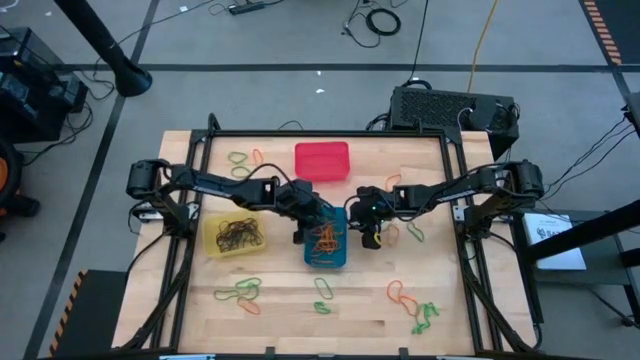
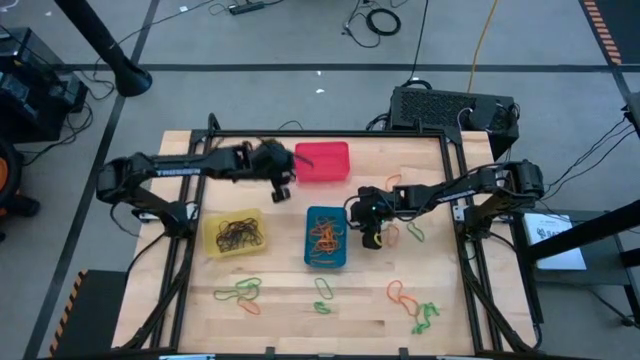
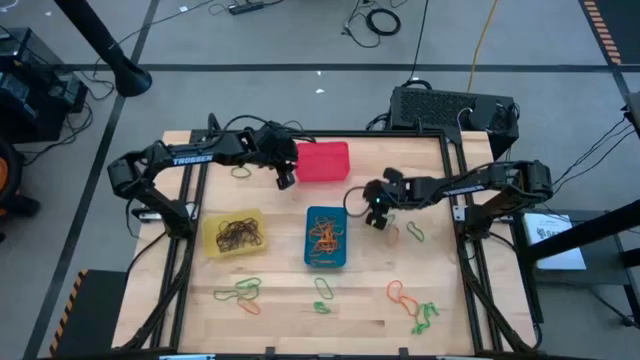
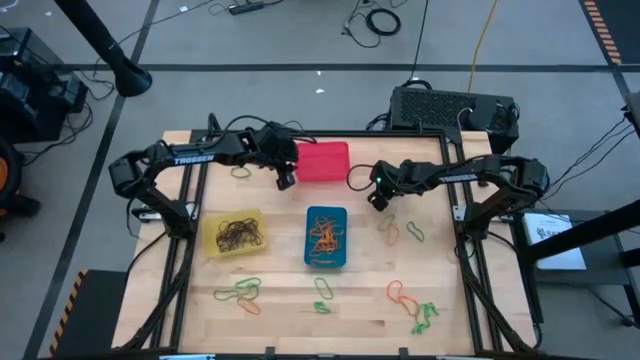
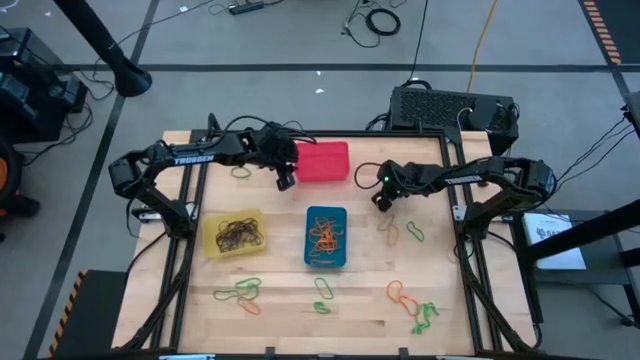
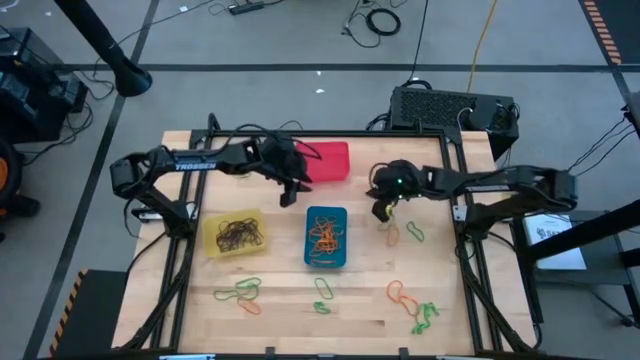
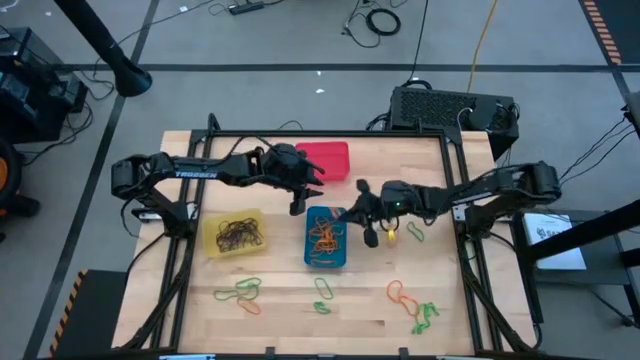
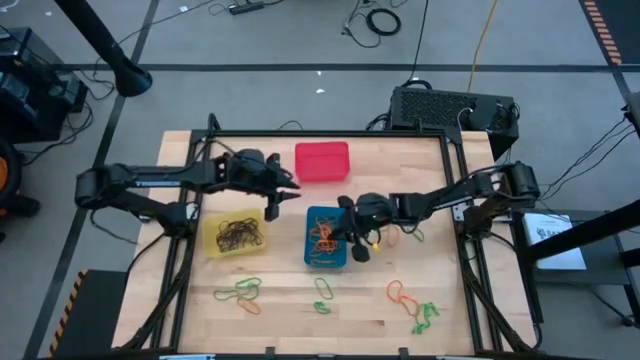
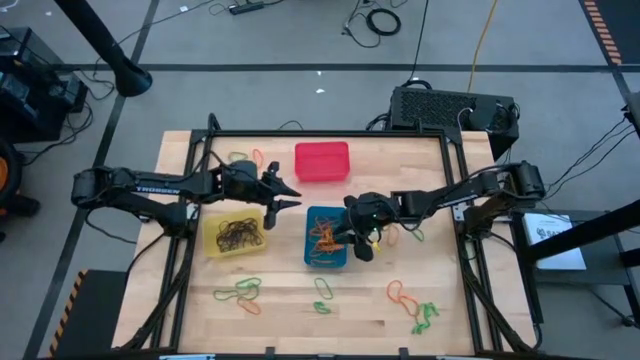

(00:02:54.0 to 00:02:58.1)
Task: Sort rubber bands into baskets
Put the orange rubber band into the blue bin

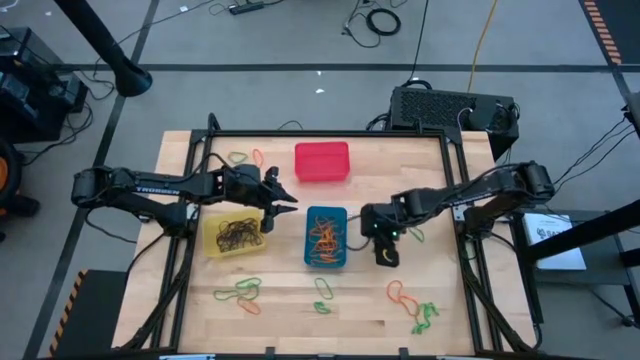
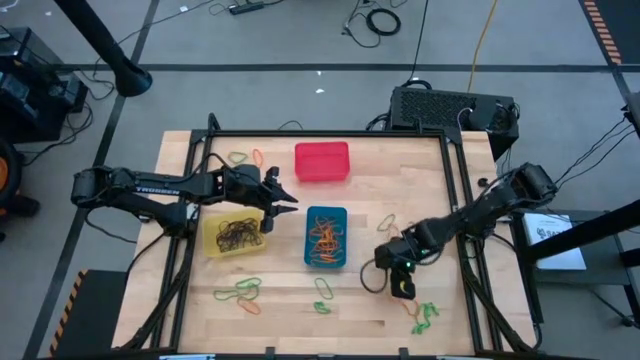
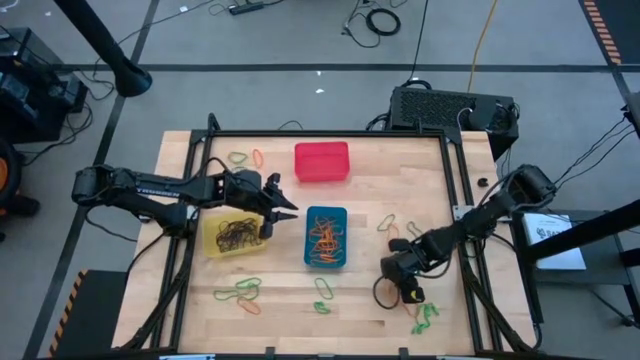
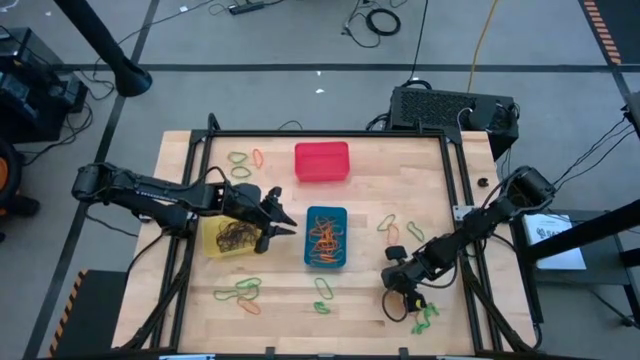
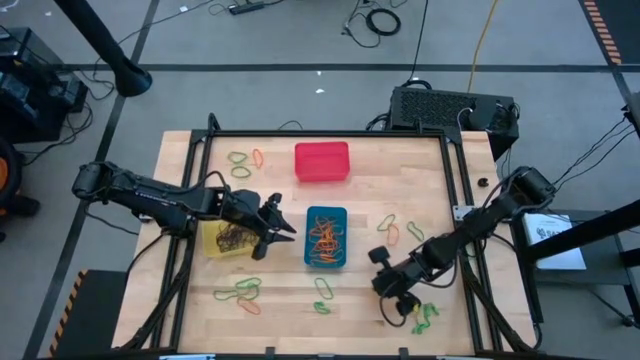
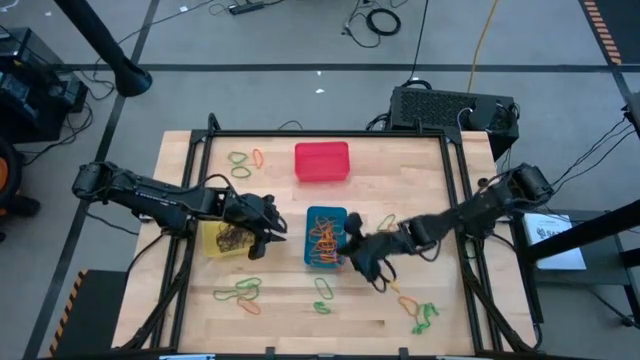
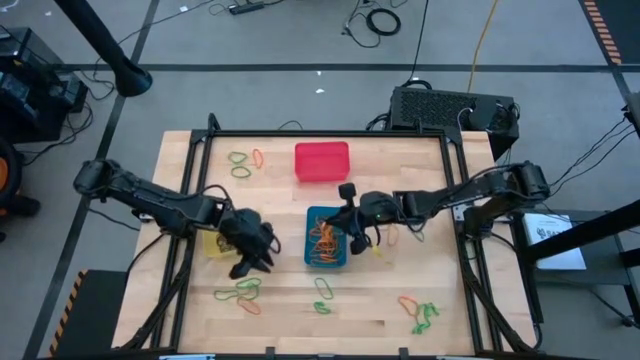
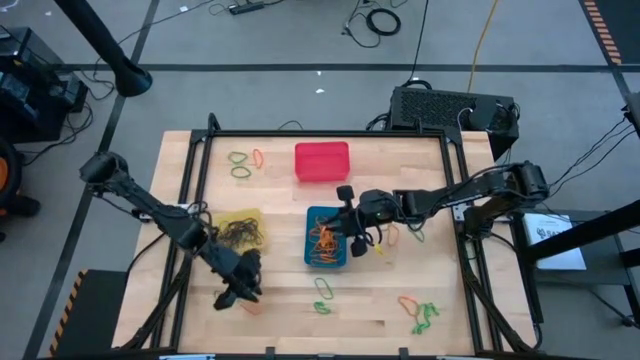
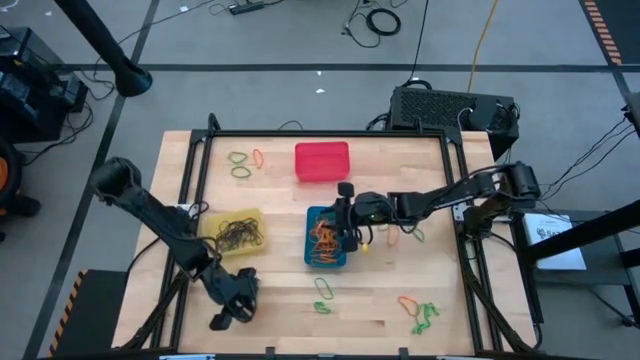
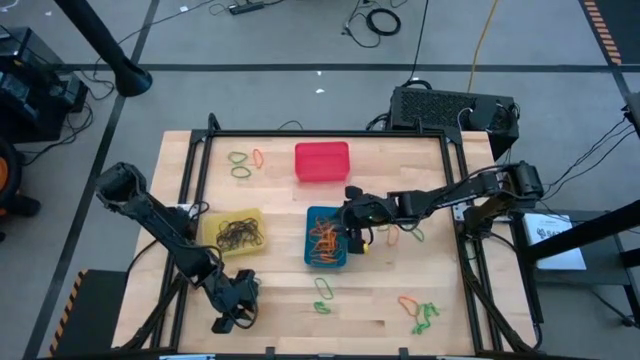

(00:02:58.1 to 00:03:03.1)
Put the orange rubber band into the blue bin

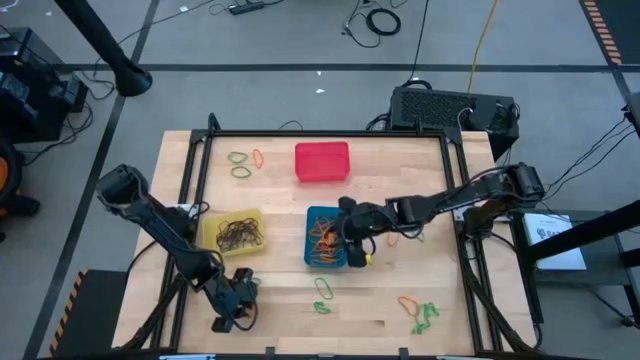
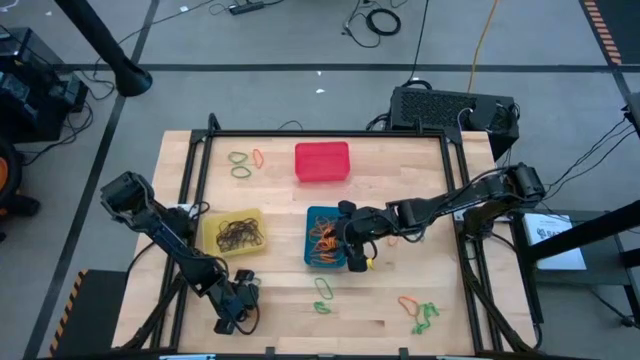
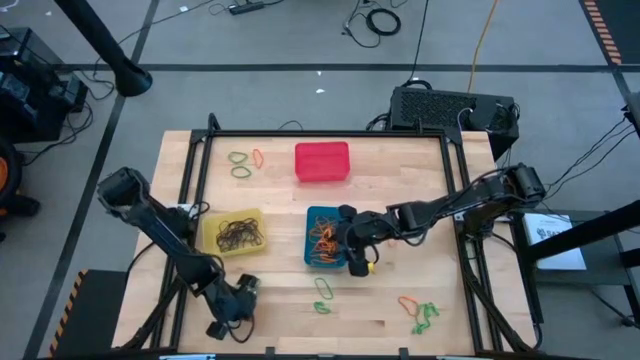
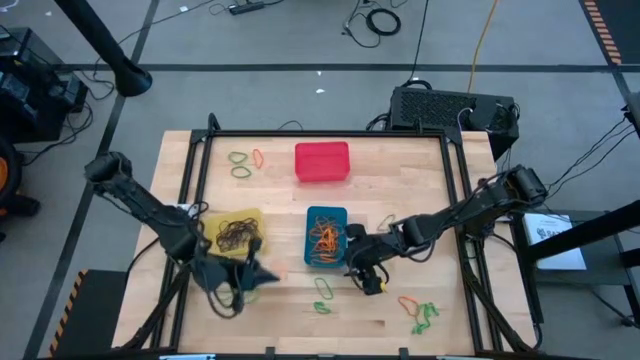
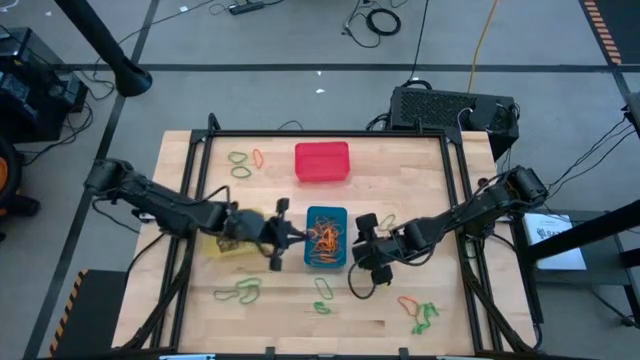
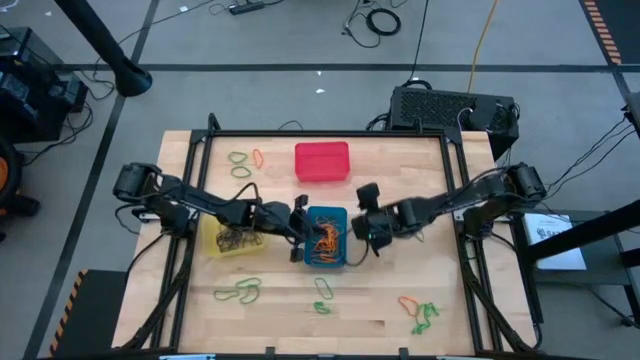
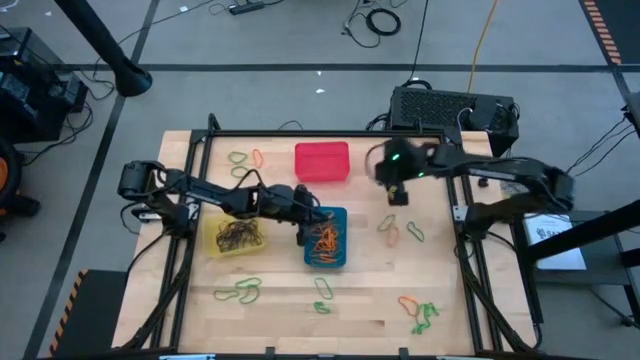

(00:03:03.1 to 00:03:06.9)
Put the orange rubber band into the blue bin

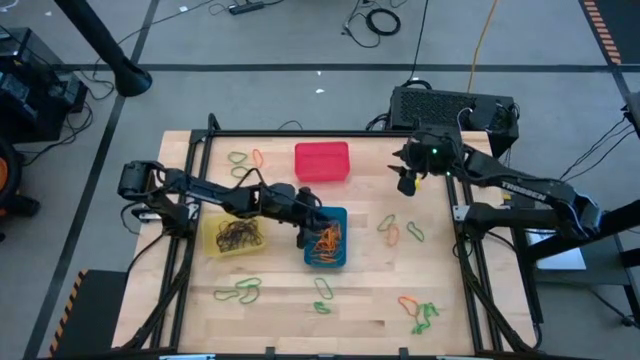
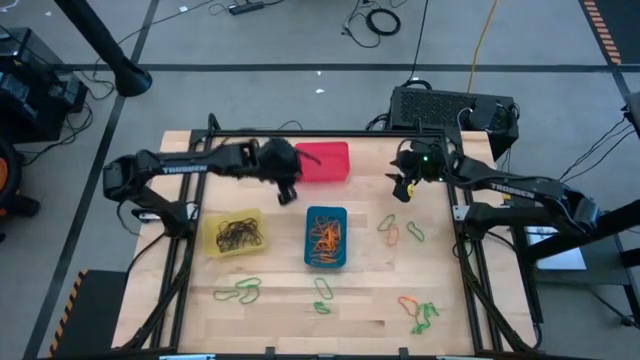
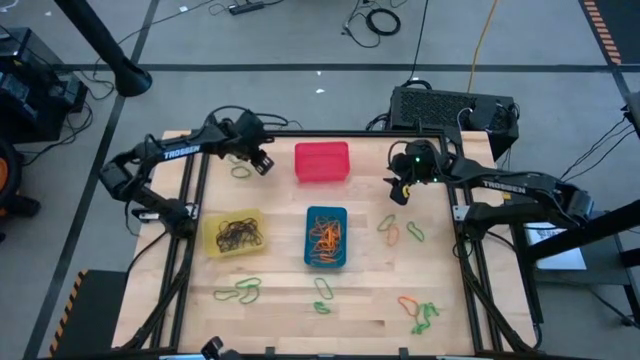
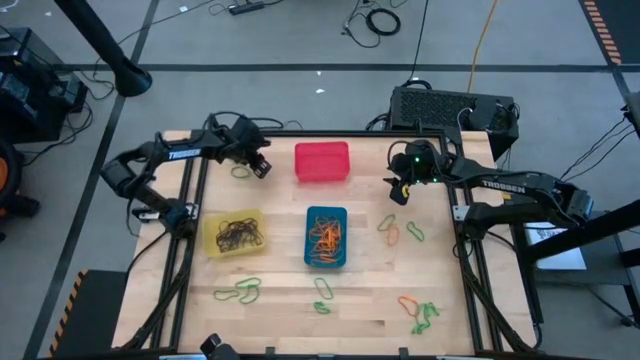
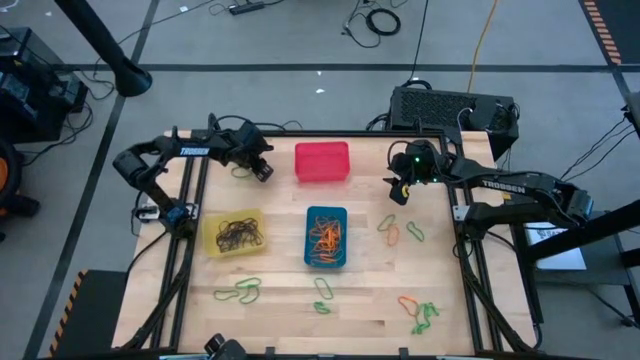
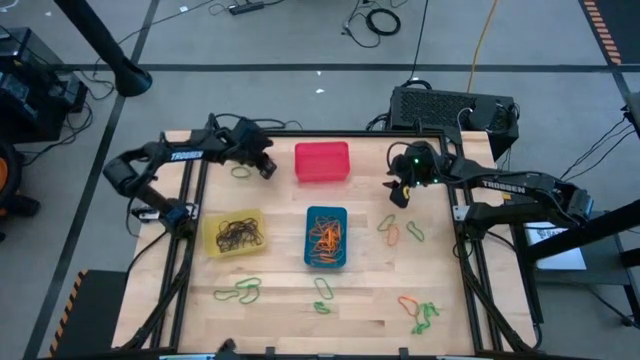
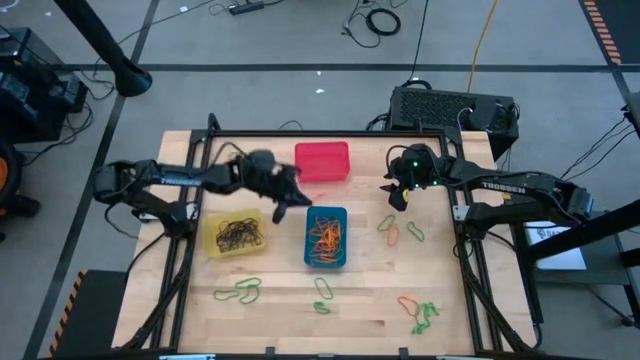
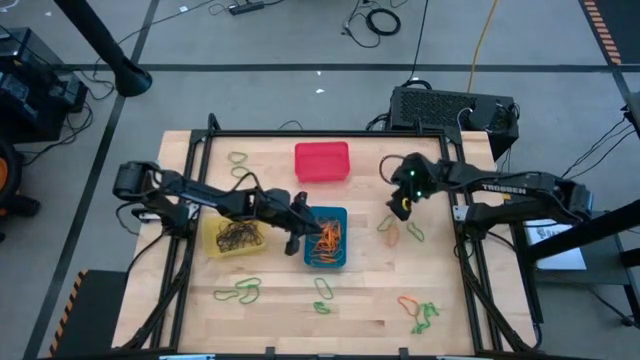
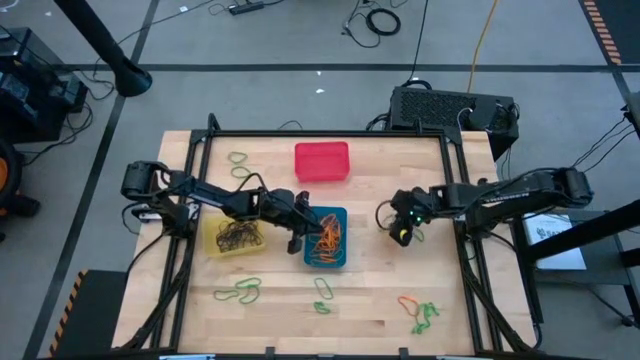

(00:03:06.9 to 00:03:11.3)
Put the orange rubber band into the blue bin

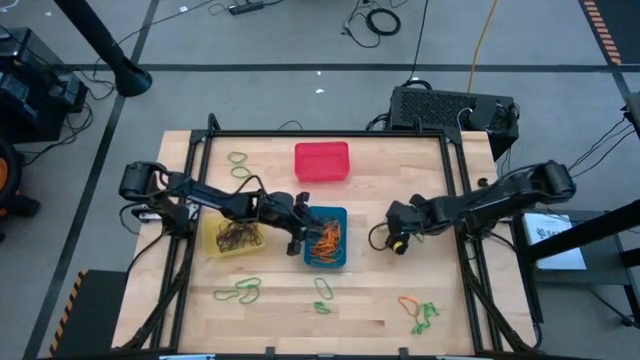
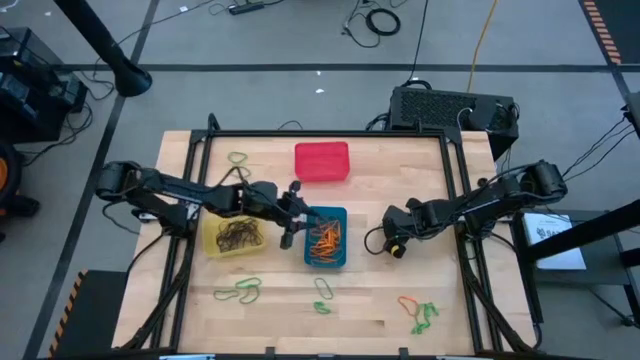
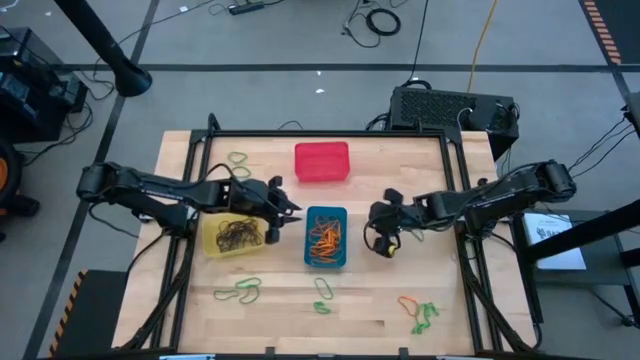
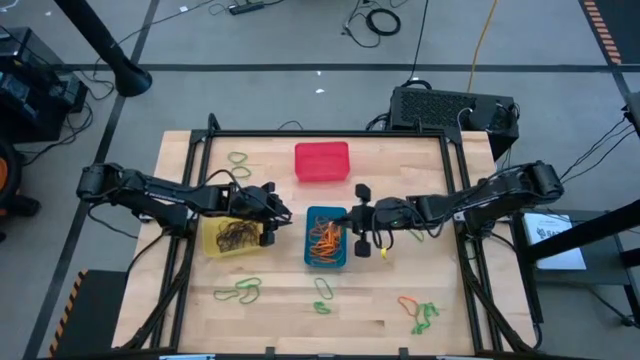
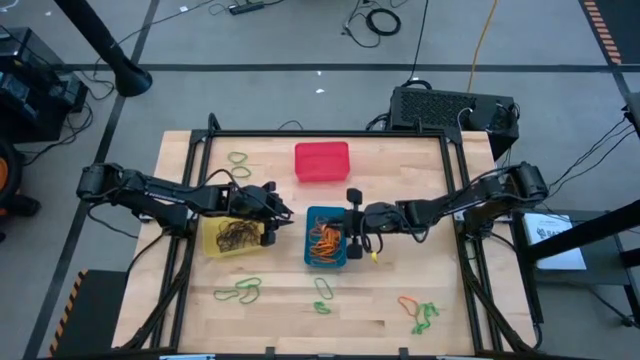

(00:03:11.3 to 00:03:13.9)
Put the orange rubber band into the blue bin

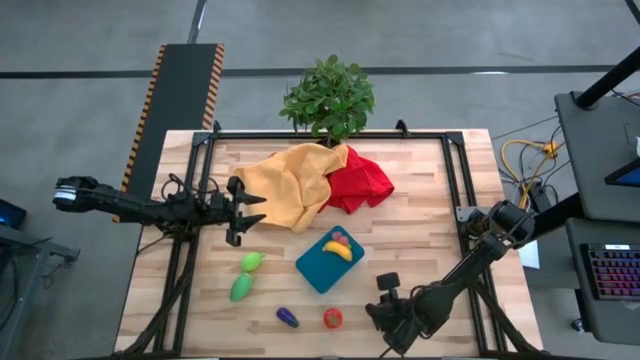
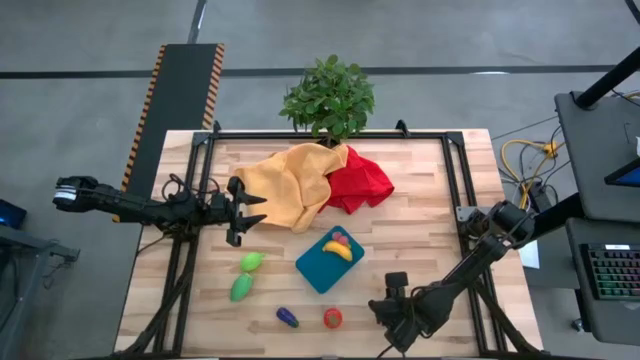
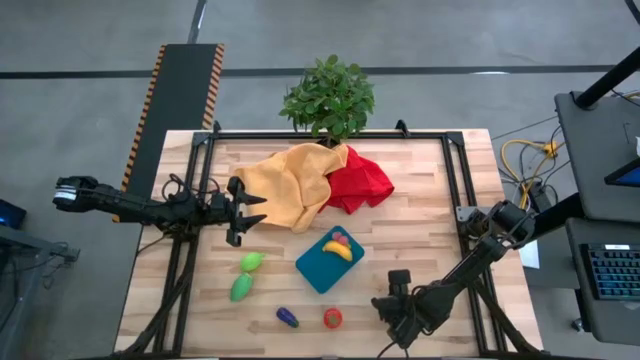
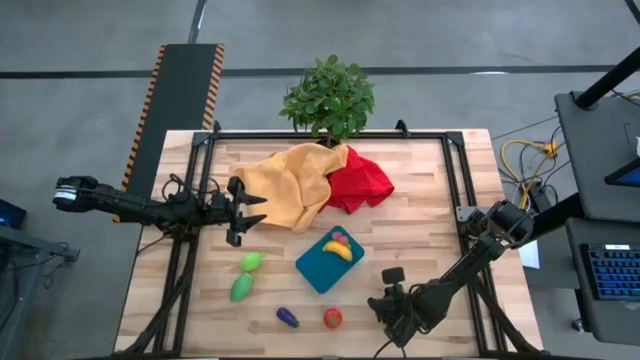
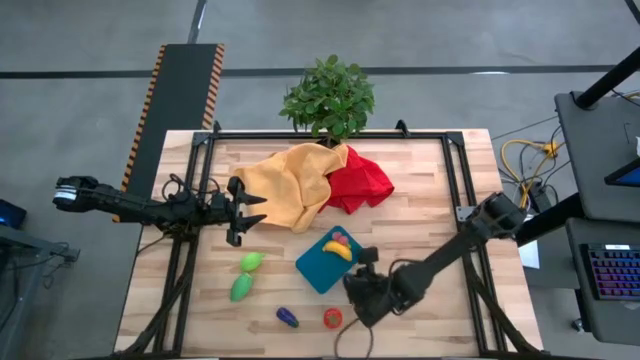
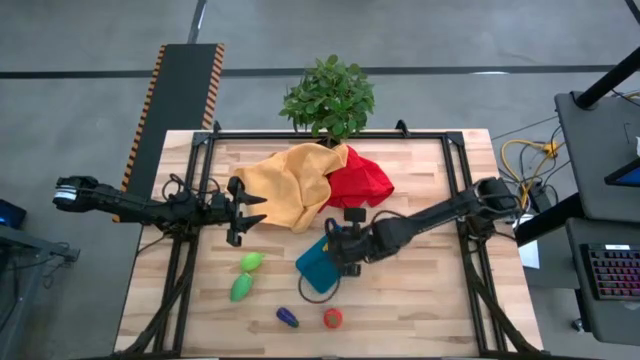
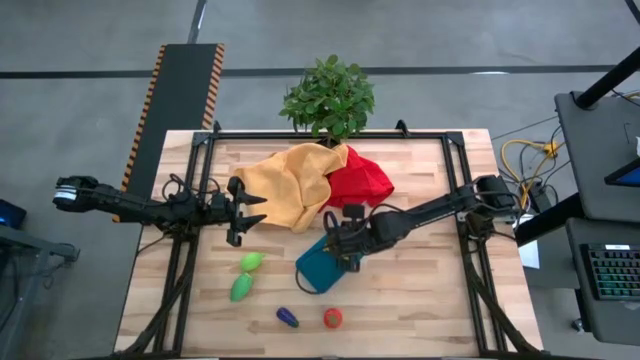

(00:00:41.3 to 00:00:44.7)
Task: Pick and placing Produce into tupperware
Put the pink peach into the blue bin
